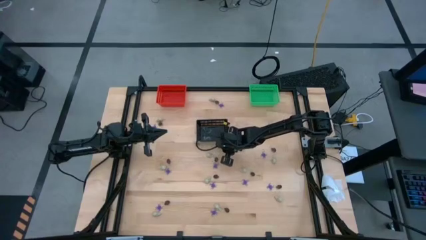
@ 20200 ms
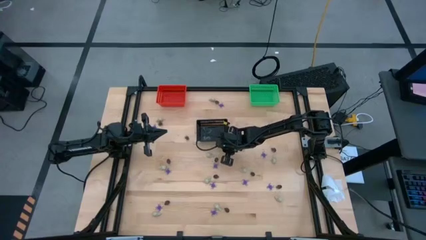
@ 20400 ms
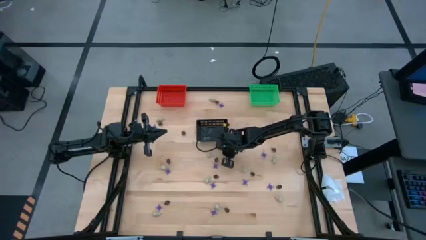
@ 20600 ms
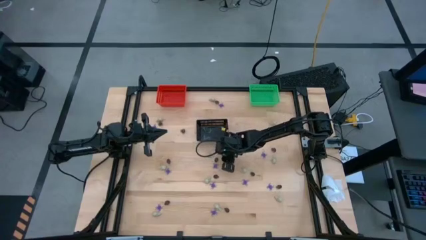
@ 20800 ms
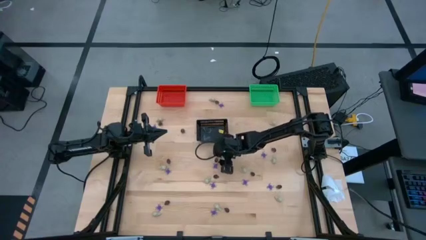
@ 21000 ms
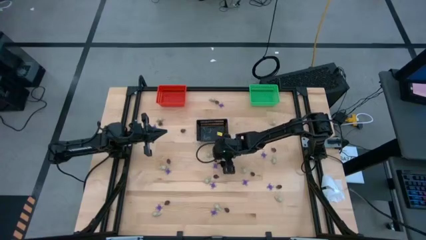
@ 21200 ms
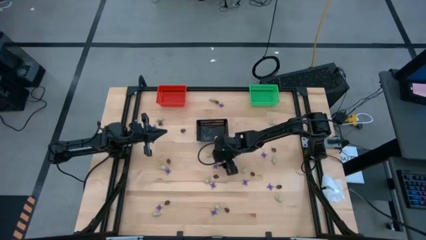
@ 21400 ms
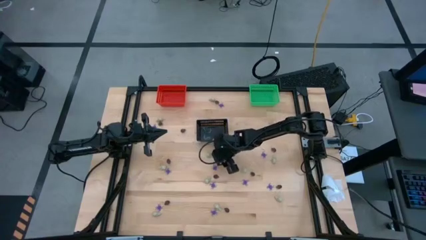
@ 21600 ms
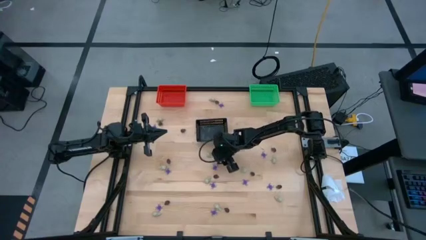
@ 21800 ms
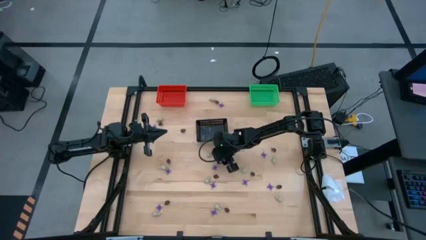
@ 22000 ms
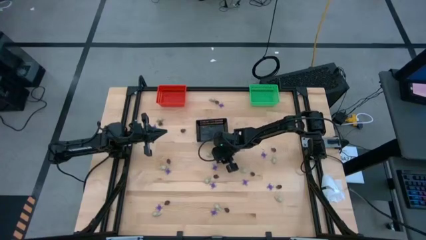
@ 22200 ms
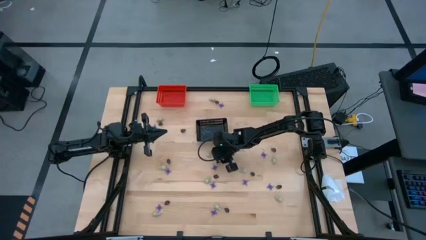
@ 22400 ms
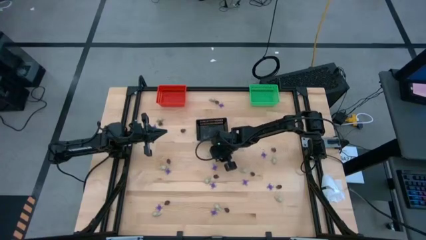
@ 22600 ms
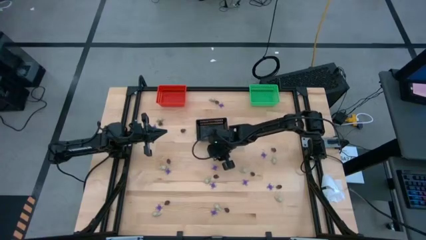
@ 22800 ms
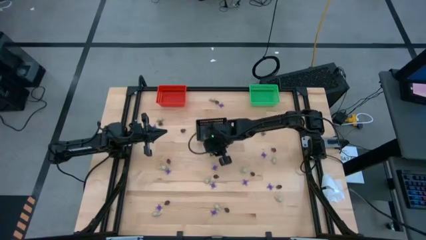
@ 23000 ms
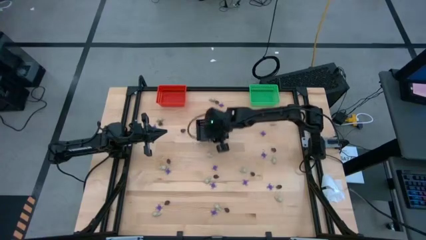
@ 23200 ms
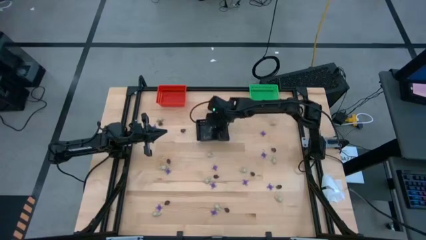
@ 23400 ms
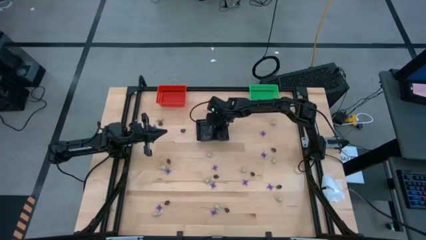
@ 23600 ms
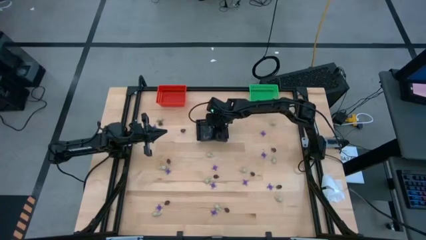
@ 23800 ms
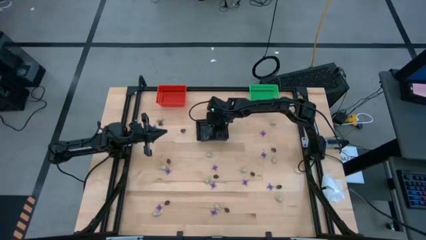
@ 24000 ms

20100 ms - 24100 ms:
Task: Sort Halloween decoration
Put the black skull toy into the black bin

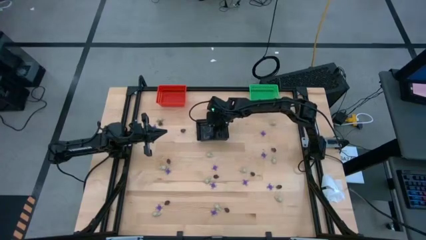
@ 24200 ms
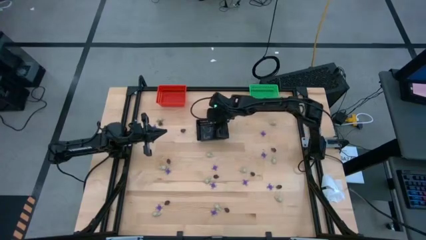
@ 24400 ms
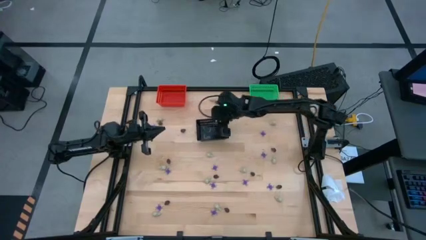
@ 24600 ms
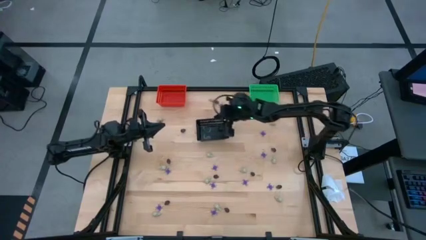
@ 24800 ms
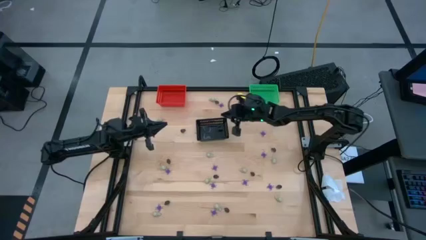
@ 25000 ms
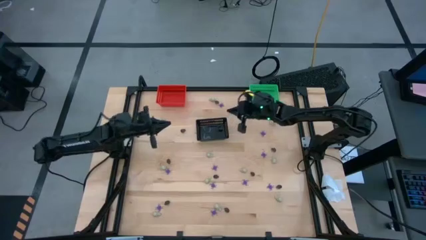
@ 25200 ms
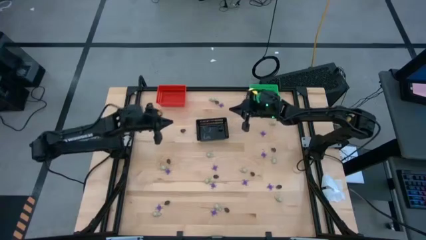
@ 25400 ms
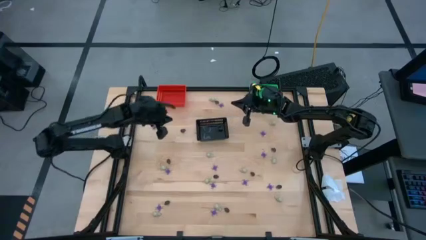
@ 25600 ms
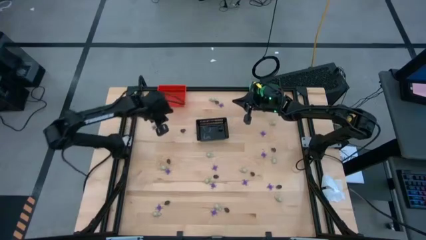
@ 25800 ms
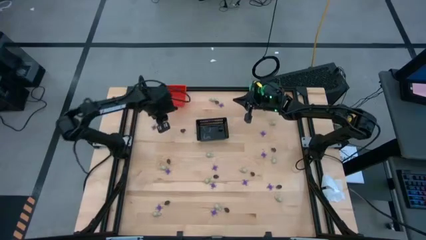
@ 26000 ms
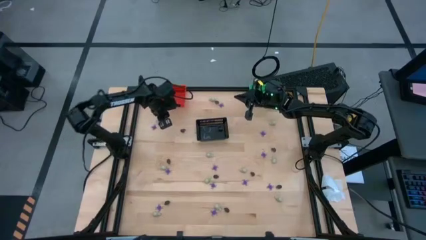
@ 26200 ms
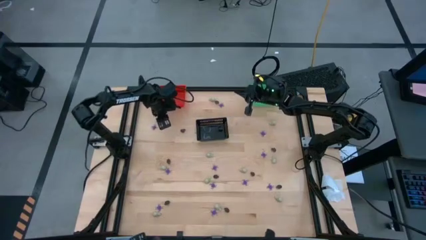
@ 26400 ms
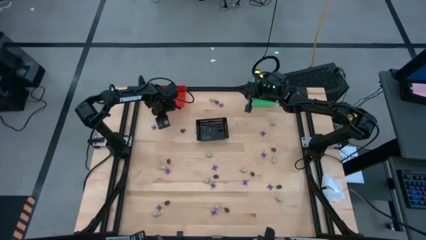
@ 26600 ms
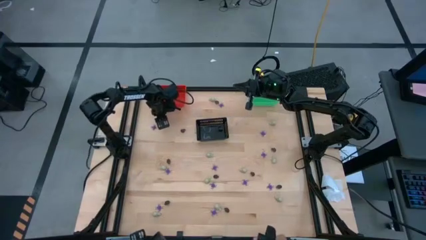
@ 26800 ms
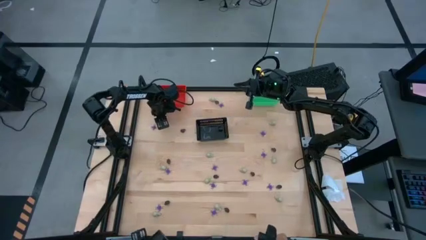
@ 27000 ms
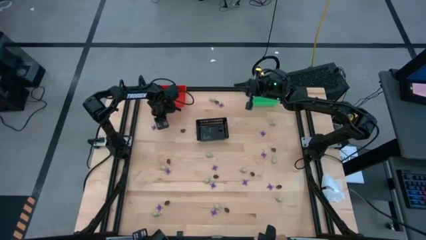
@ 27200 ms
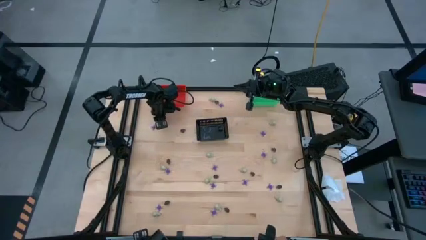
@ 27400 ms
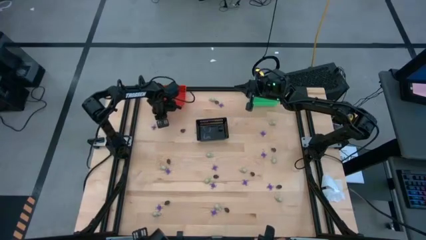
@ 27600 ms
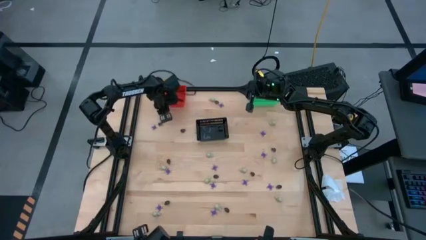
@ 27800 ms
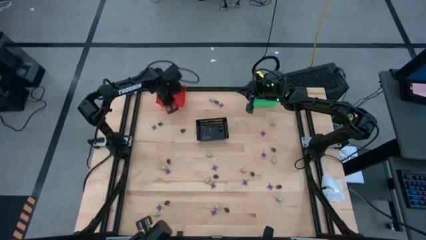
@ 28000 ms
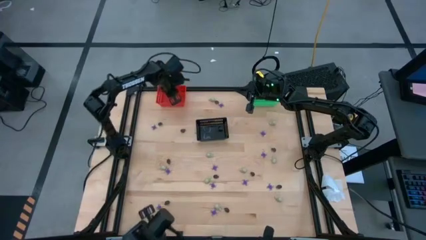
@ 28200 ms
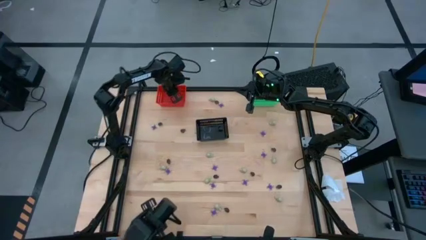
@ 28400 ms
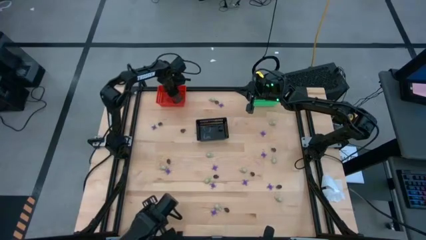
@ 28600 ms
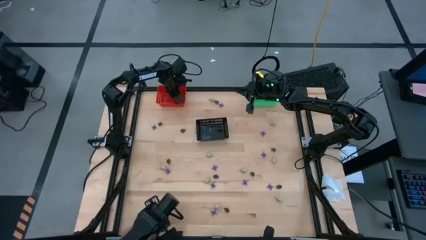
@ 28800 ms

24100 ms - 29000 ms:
Put the white skull toy into the orange bin

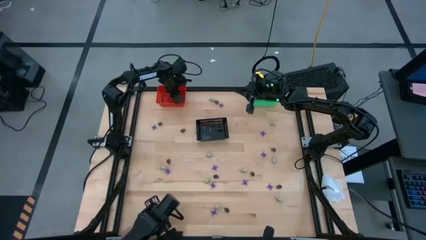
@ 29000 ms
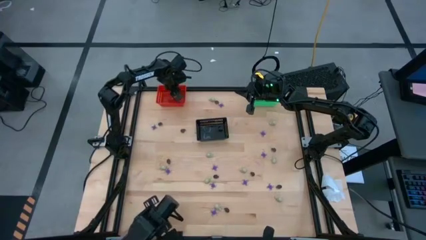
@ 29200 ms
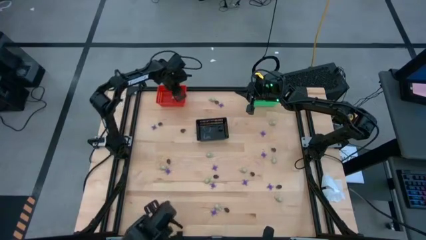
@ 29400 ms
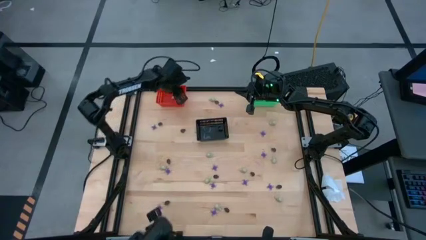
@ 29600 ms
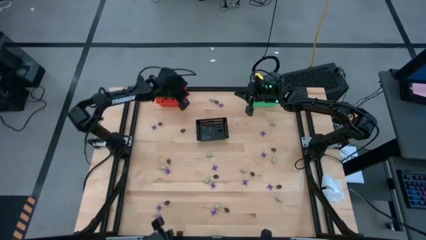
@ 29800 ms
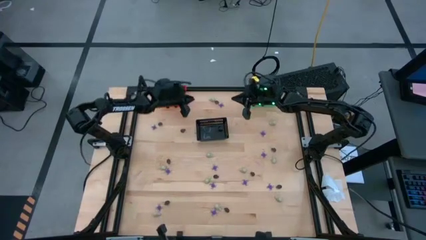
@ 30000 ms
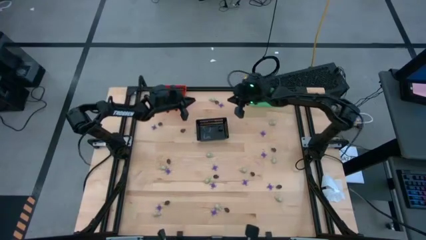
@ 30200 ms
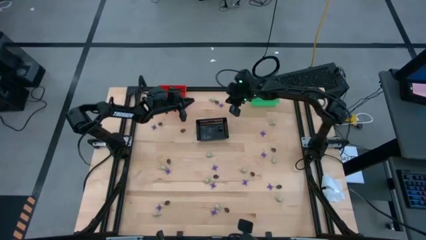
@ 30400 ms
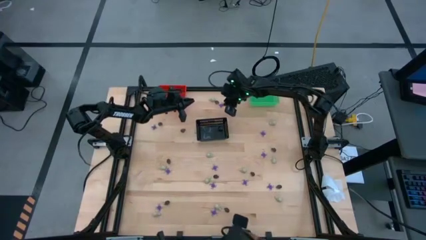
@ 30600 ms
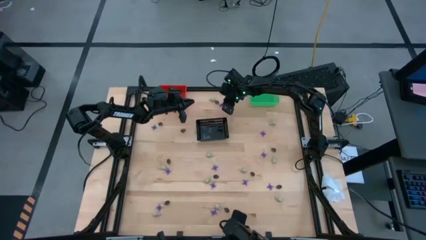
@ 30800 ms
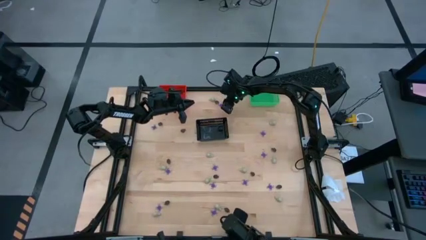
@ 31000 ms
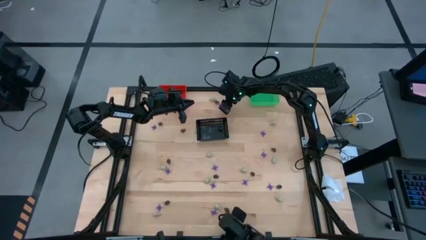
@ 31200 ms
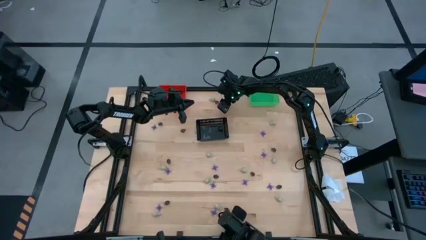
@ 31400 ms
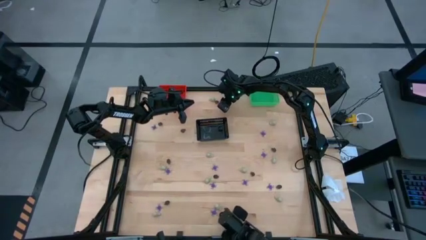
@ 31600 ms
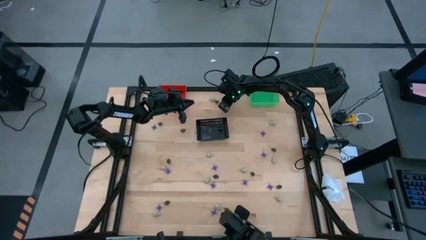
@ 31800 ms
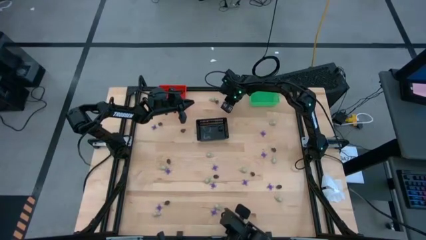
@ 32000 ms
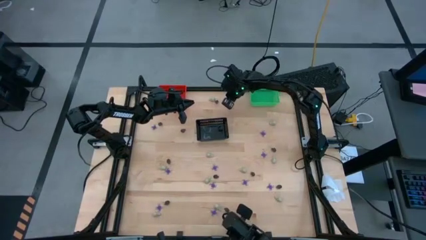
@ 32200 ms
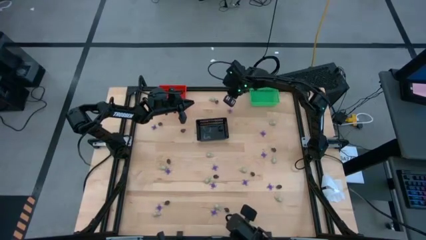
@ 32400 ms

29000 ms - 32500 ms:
Put the violet spider toy into the green bin

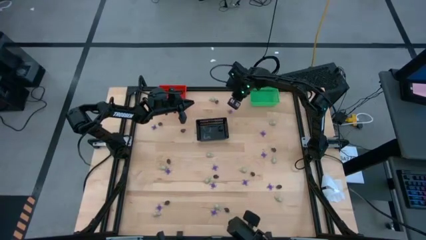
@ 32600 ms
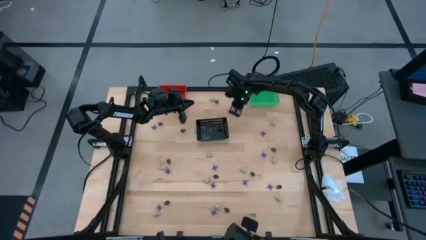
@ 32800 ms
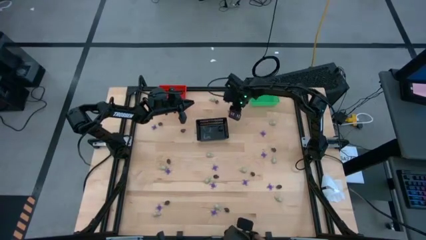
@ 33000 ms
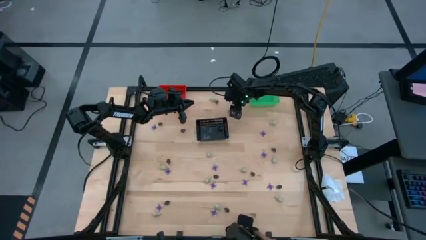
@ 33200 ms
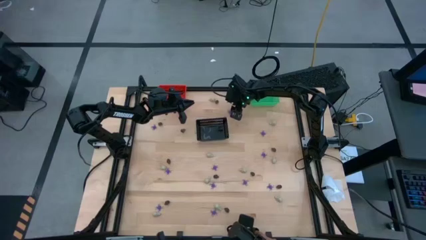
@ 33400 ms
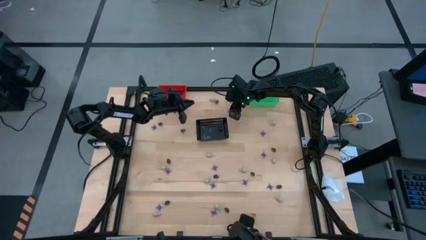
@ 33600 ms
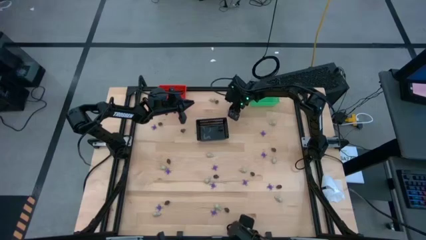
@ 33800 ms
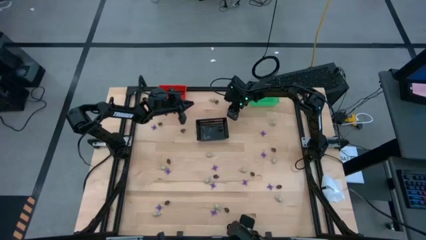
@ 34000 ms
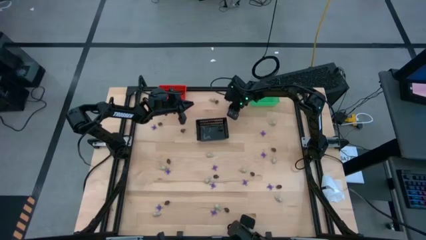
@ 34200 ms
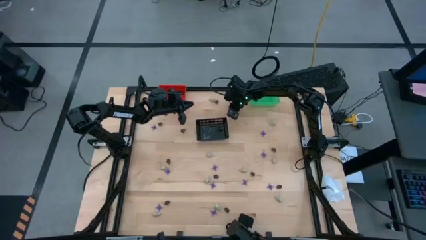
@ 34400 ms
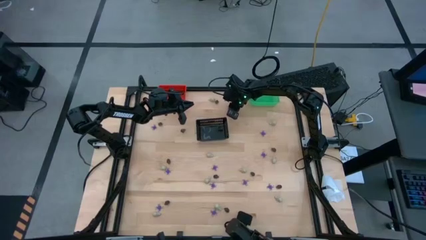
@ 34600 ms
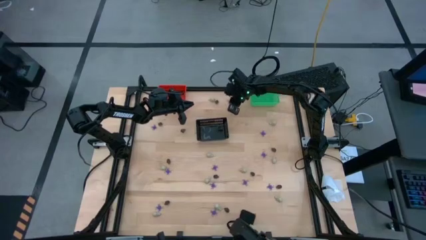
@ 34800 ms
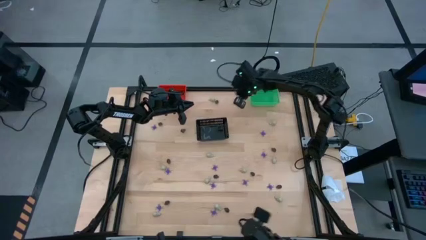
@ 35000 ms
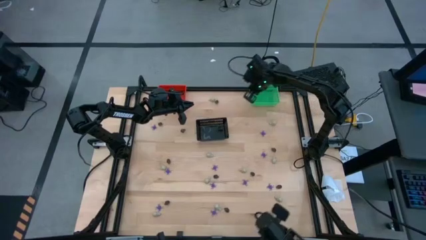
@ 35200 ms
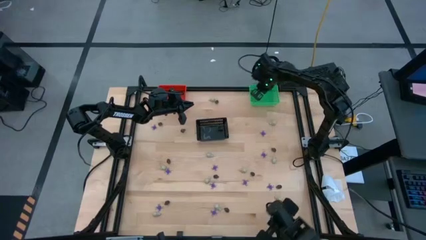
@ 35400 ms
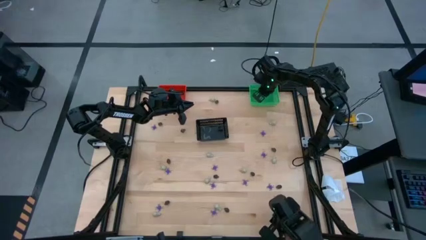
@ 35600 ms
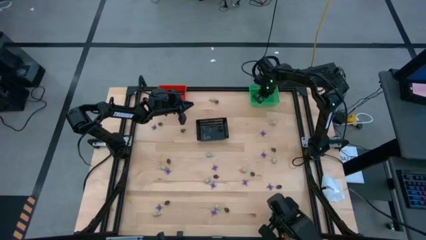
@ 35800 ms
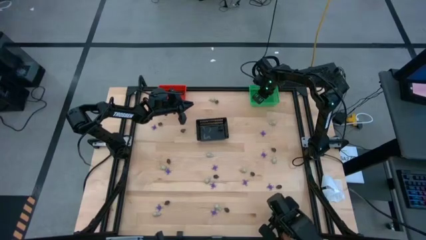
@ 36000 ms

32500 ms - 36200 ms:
Put the violet spider toy into the green bin
